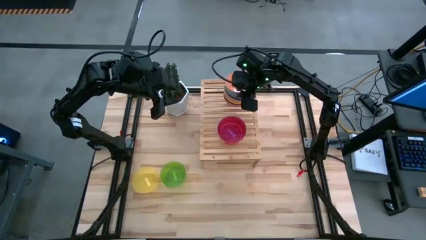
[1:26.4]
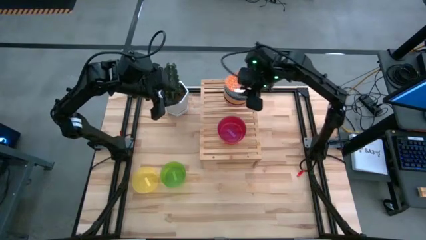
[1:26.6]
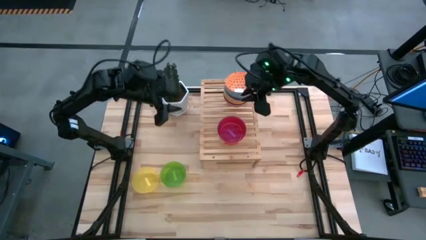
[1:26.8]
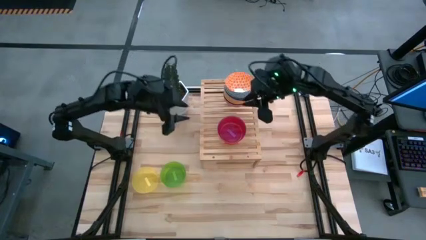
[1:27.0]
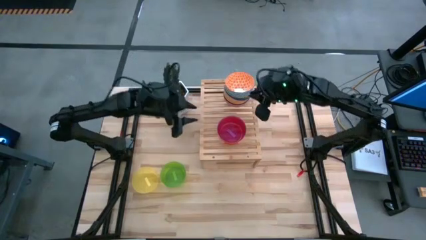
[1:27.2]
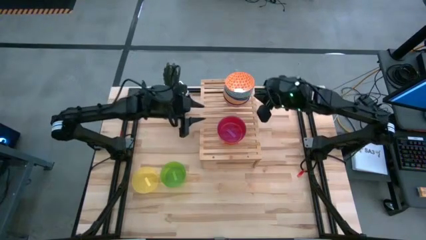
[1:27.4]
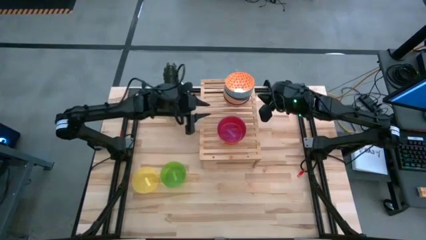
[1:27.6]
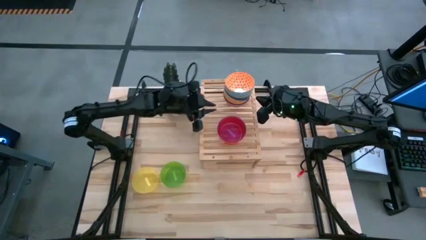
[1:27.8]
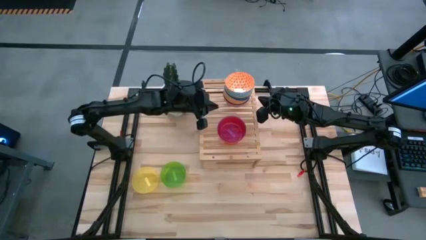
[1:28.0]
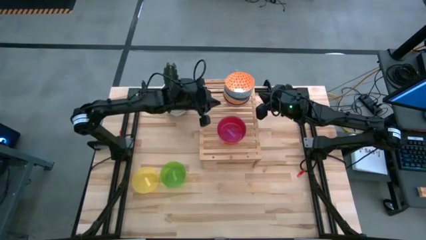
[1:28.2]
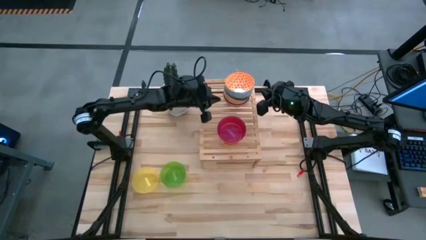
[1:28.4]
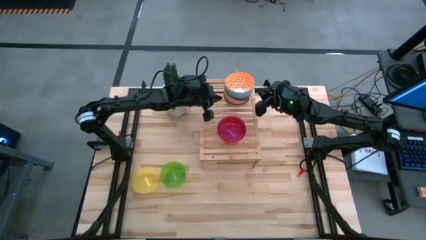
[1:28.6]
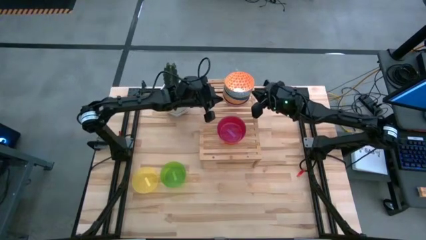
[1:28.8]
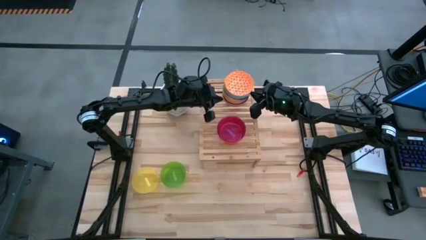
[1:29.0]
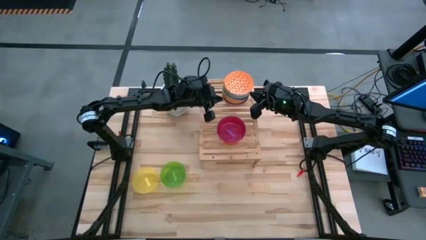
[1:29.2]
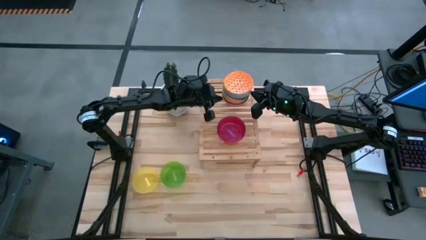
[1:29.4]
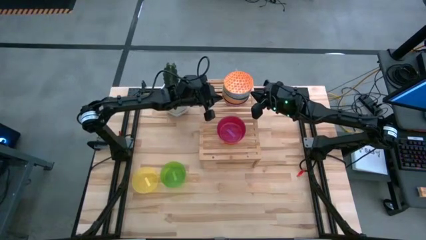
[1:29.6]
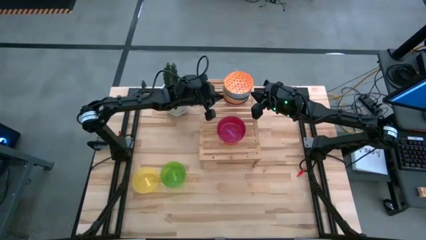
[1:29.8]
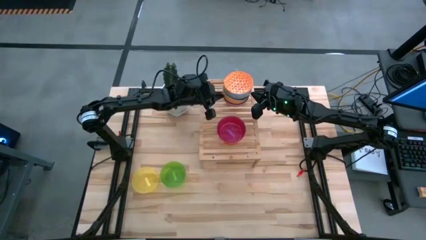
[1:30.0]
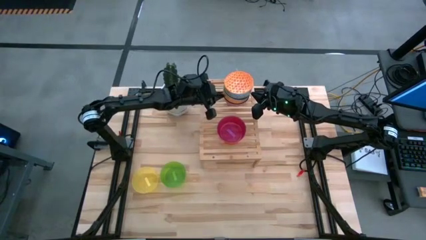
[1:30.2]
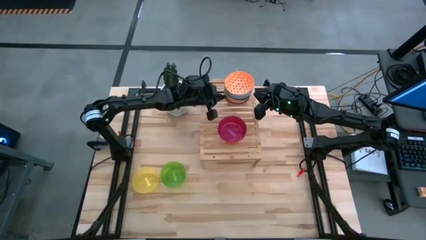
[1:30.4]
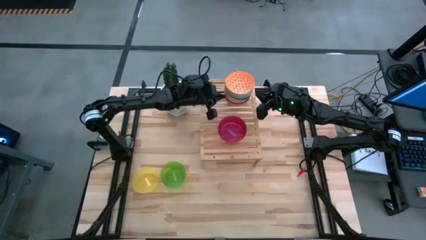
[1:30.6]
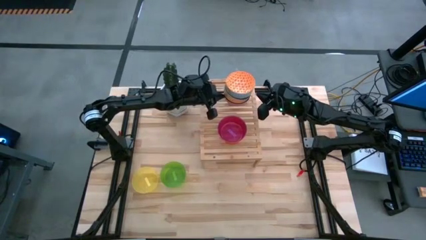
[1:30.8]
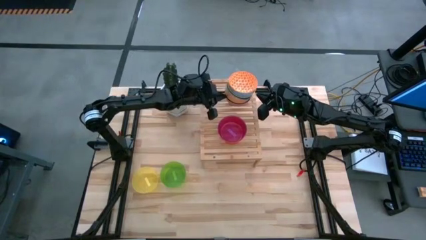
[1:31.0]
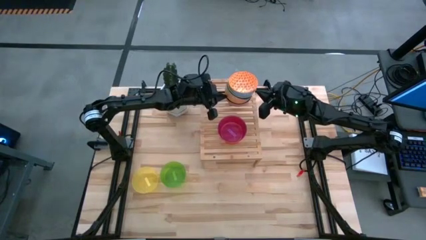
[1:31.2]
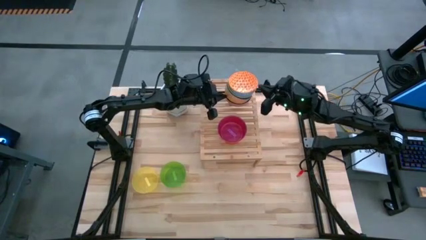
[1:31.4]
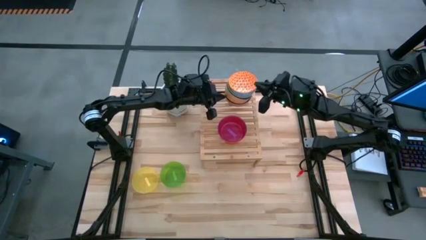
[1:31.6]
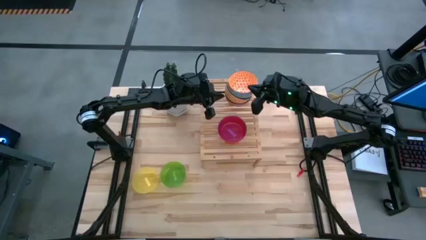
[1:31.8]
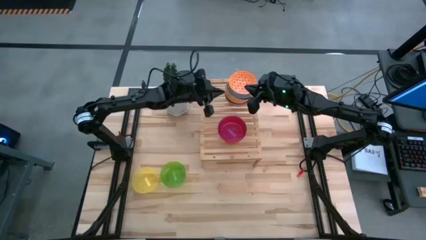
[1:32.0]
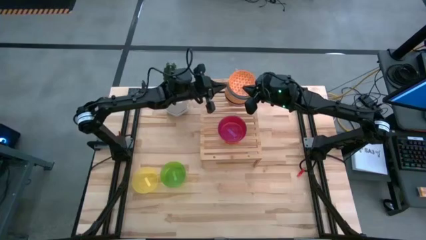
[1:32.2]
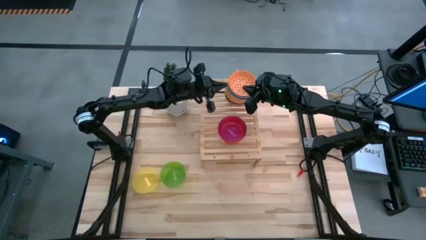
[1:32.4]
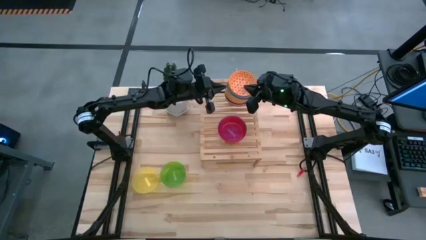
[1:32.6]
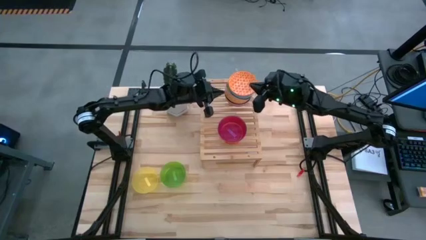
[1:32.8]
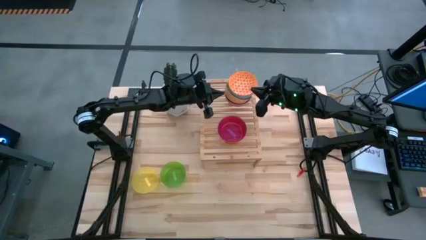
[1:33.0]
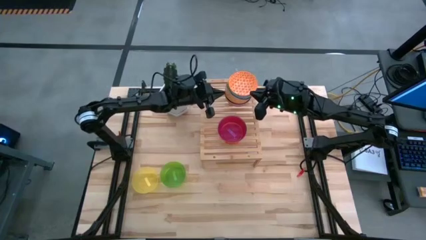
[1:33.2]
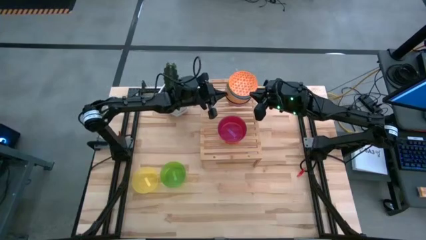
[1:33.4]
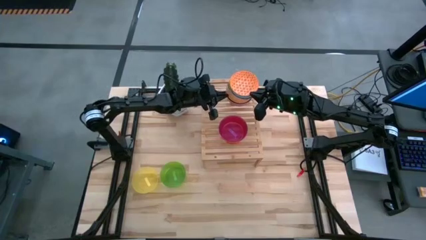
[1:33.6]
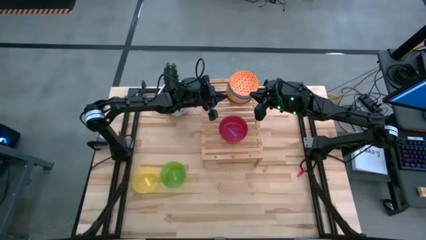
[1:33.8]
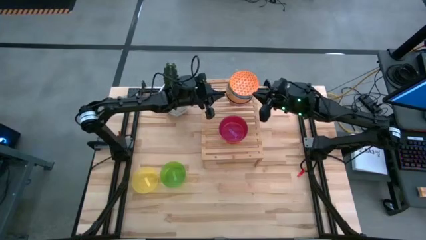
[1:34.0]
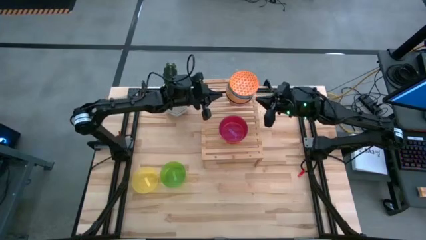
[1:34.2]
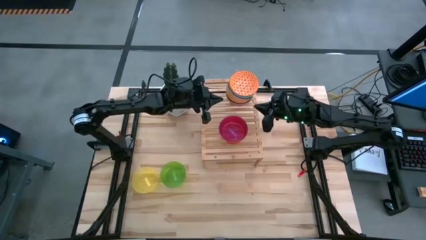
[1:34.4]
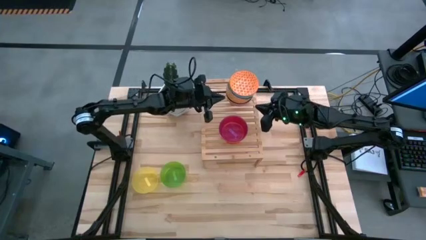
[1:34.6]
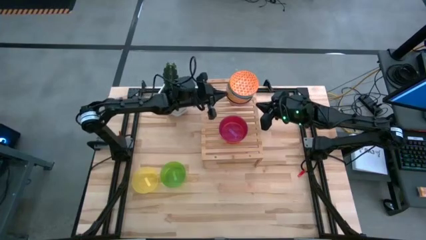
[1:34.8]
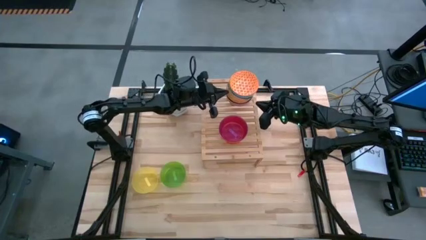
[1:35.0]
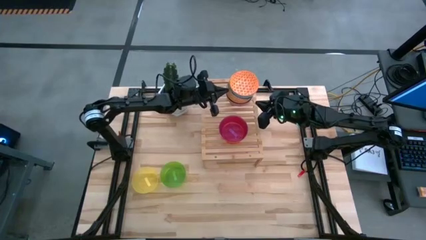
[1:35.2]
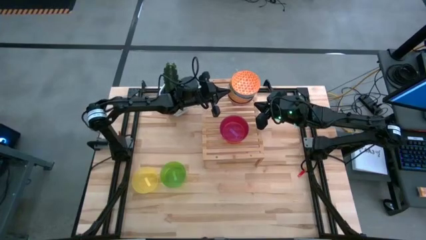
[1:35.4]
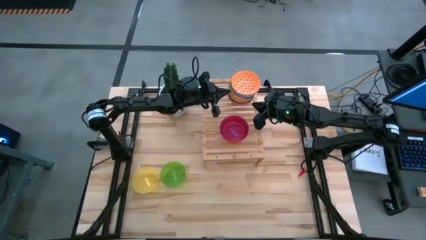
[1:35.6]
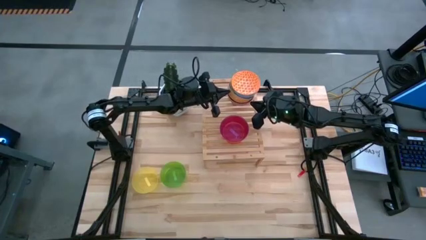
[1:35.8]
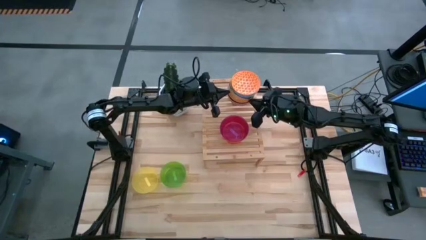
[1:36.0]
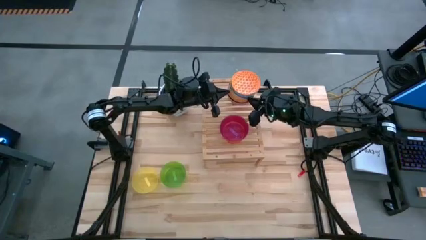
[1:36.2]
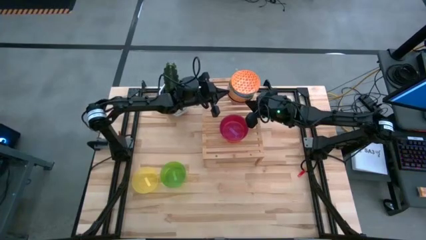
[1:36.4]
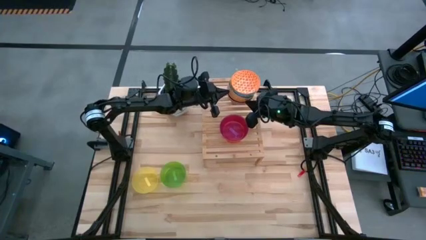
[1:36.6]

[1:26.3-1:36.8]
Task: Place and stack bowls onto a shelf
Adjust the stacked patterned bowls on the shelf

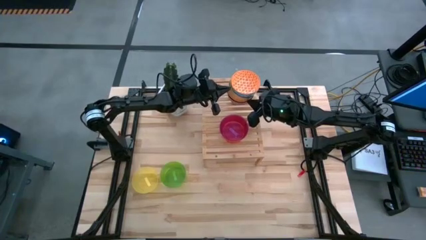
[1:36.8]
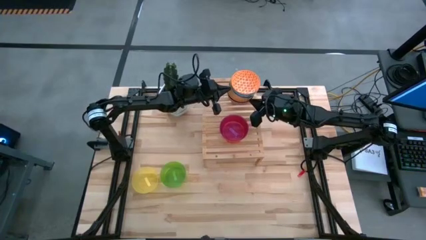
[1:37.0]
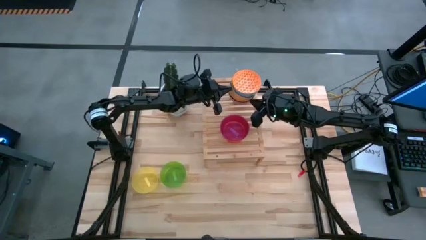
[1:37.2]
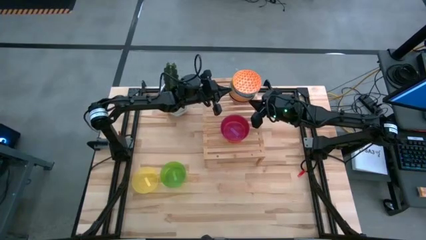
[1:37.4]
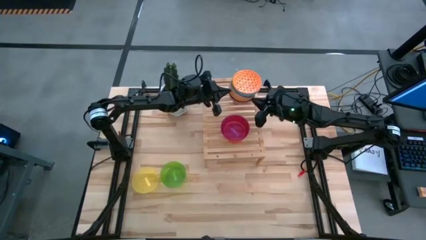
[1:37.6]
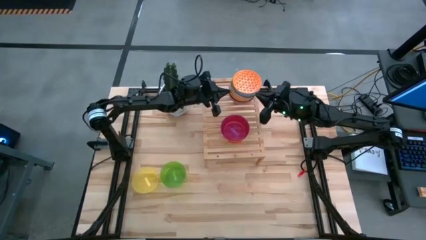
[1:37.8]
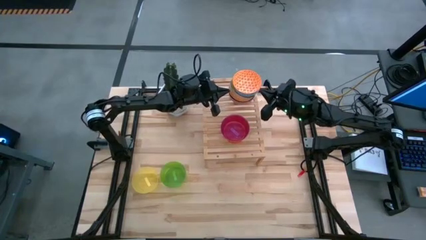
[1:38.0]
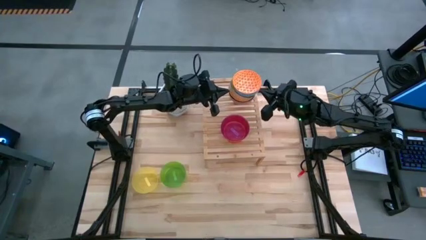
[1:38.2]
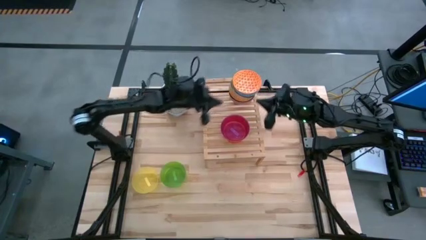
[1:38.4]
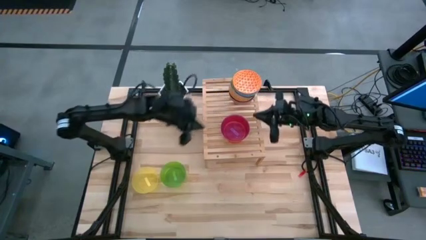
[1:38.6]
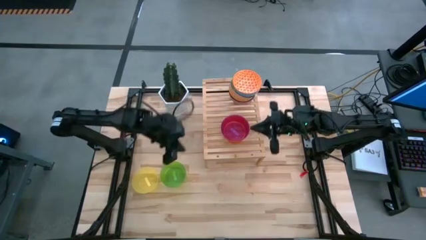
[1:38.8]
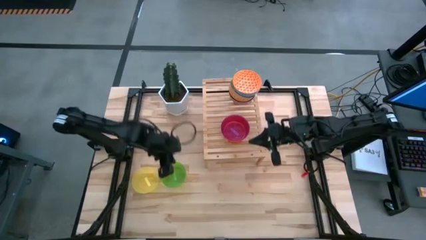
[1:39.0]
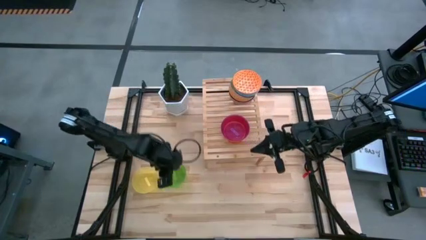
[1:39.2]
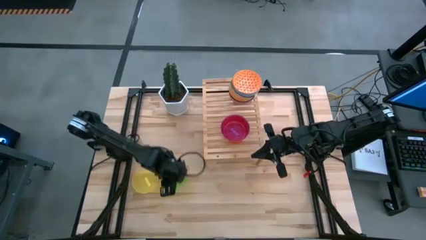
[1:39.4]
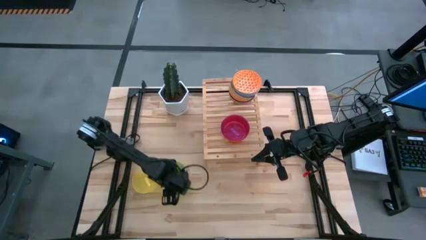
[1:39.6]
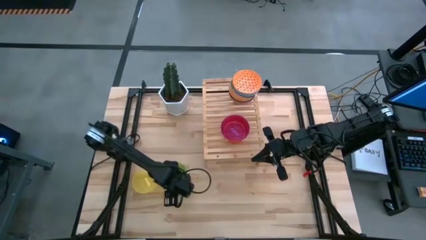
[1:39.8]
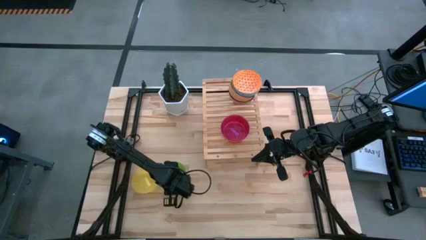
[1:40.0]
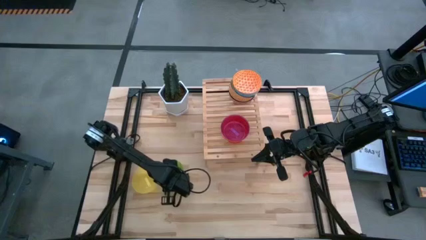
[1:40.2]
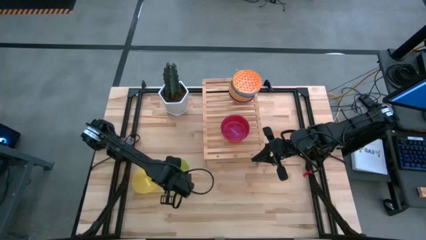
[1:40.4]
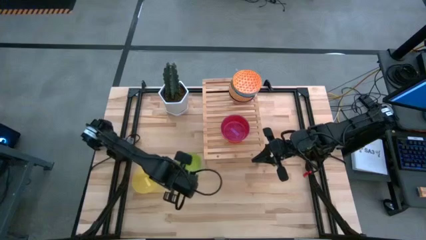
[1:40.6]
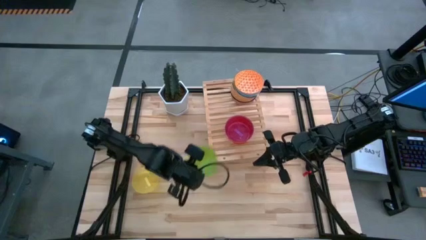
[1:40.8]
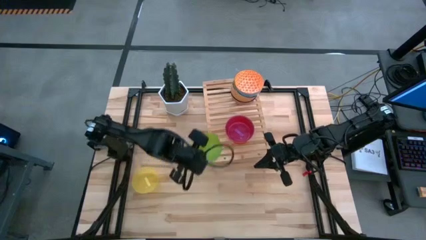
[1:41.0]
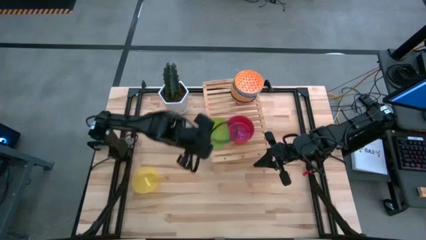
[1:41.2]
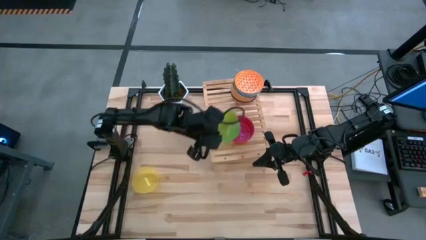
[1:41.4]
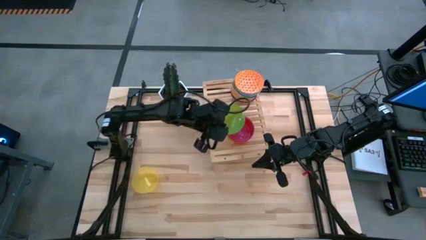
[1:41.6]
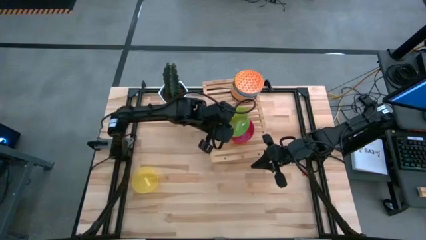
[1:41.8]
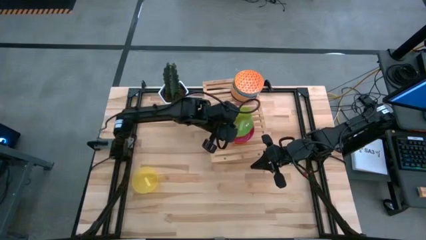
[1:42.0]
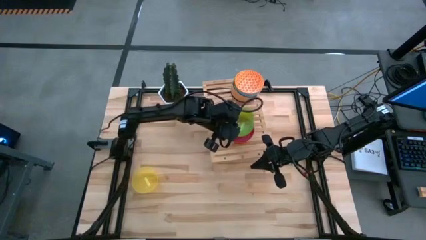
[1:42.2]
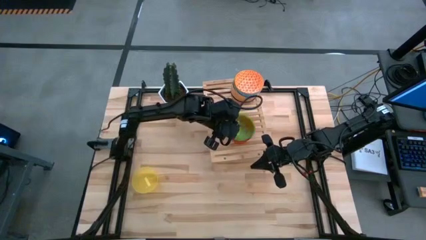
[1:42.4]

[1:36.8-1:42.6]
Stack the green bowl on top of the violet bowl on the shelf

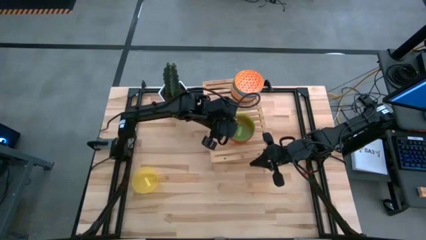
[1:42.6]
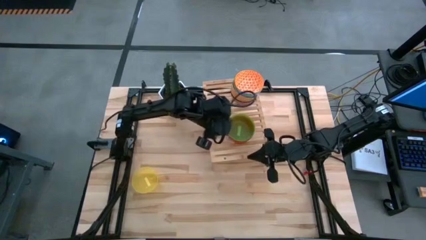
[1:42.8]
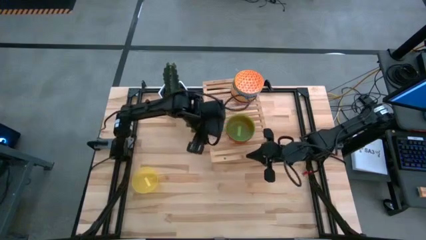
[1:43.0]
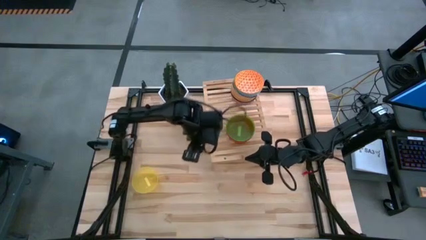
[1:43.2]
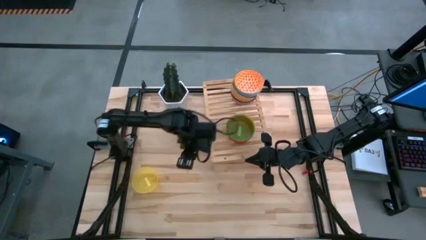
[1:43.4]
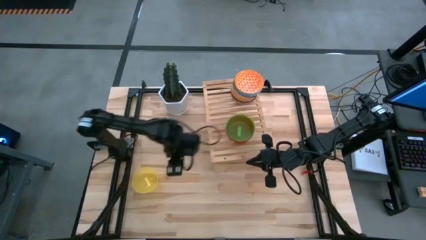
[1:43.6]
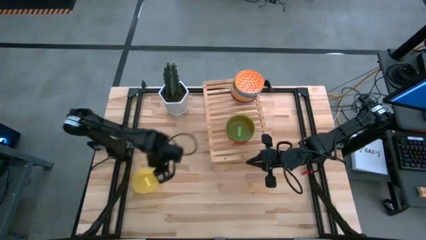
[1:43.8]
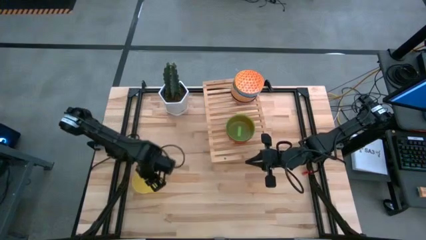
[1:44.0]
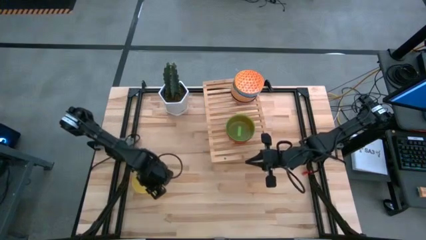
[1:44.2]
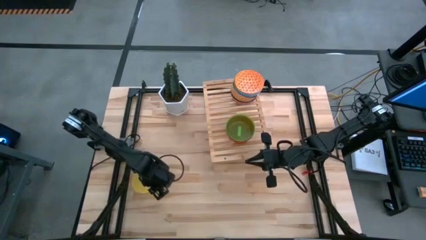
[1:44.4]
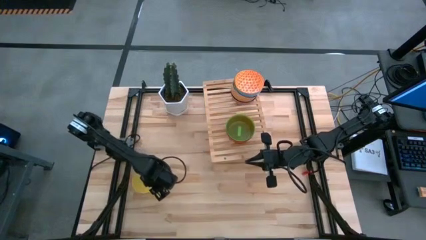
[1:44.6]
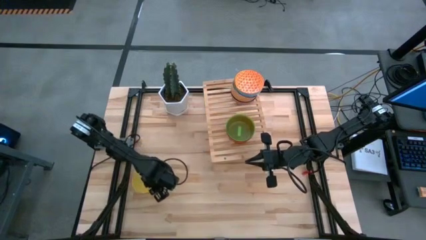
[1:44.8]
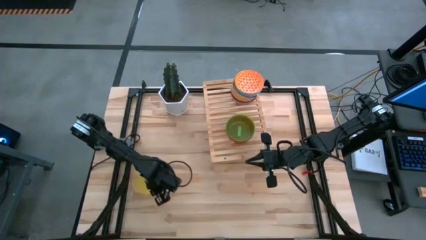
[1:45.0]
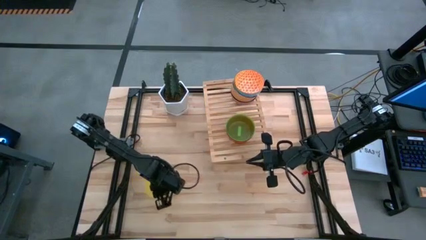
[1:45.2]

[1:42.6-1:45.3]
Stack the yellow bowl on top of the green bowl on the shelf
